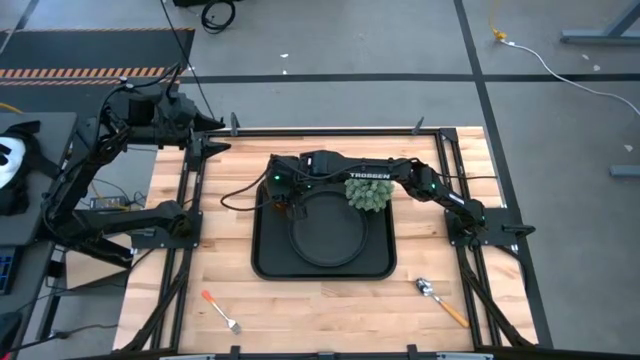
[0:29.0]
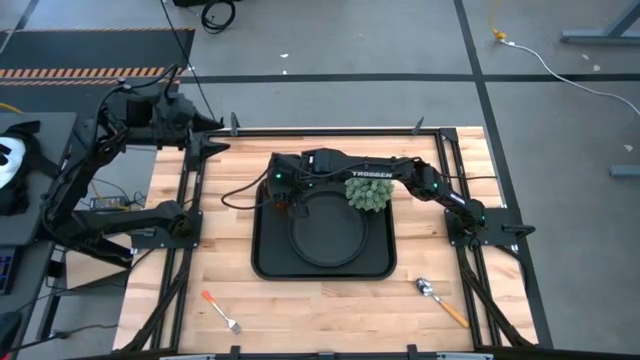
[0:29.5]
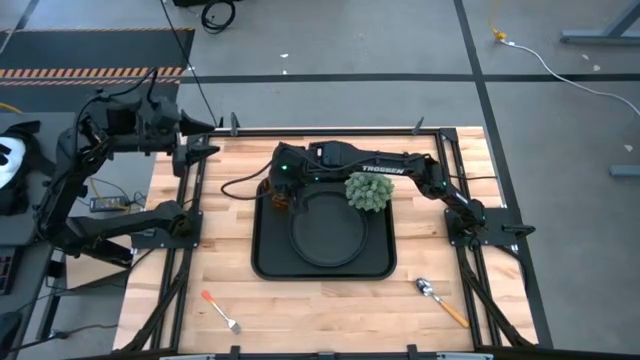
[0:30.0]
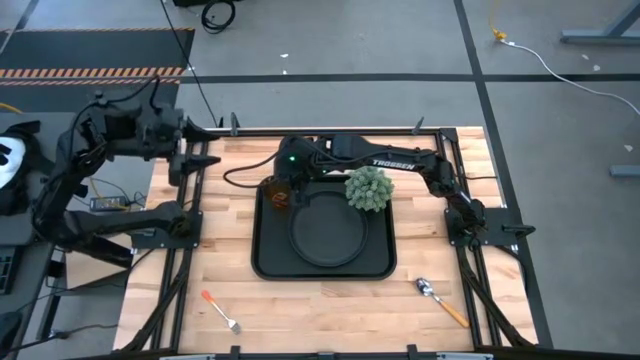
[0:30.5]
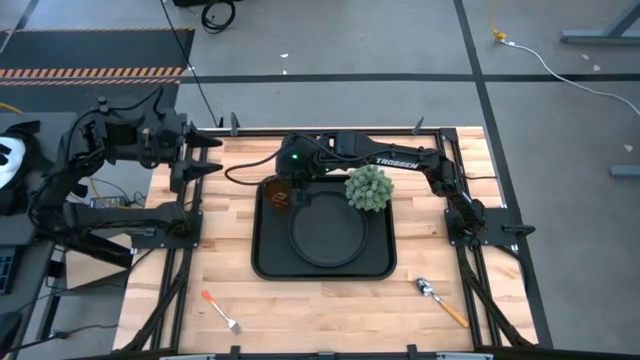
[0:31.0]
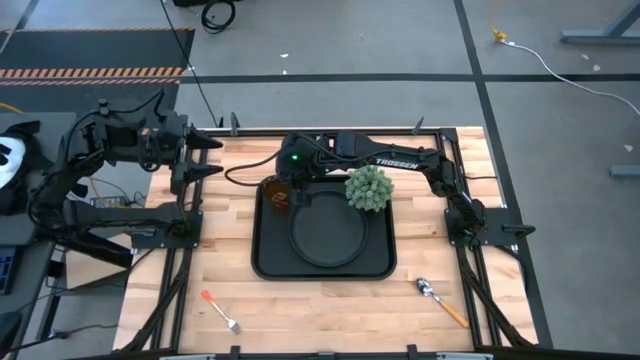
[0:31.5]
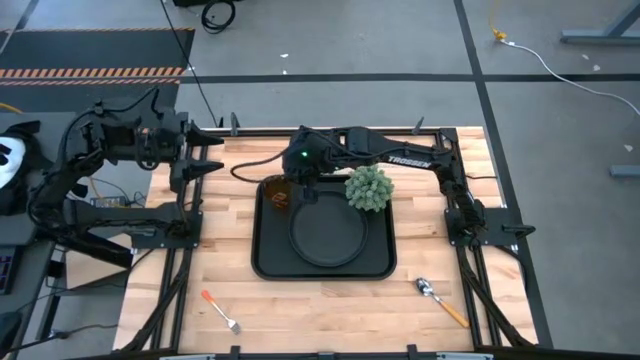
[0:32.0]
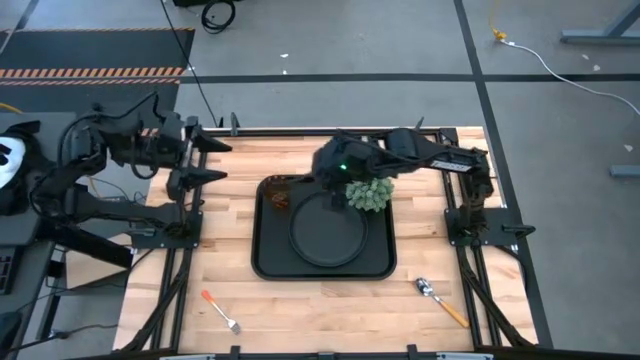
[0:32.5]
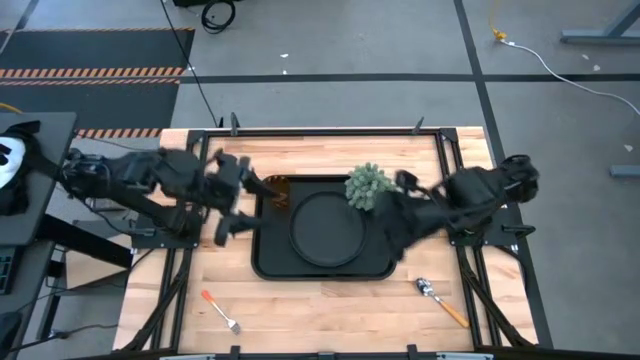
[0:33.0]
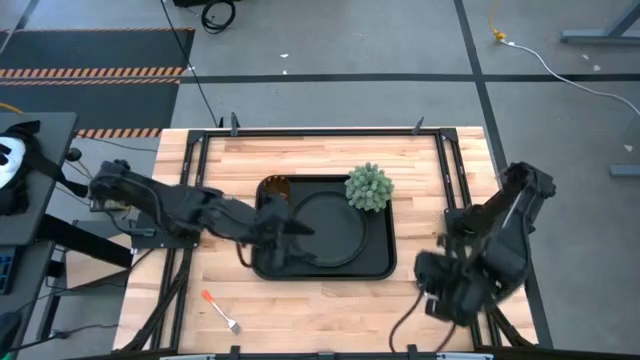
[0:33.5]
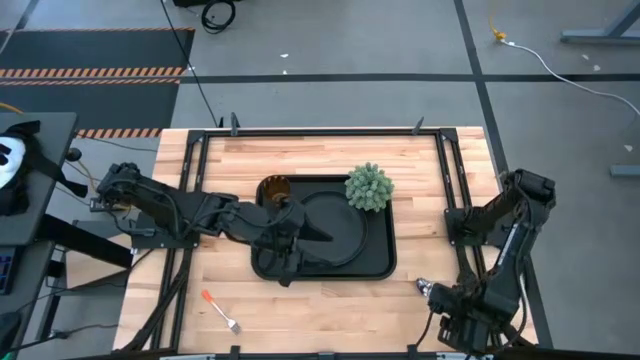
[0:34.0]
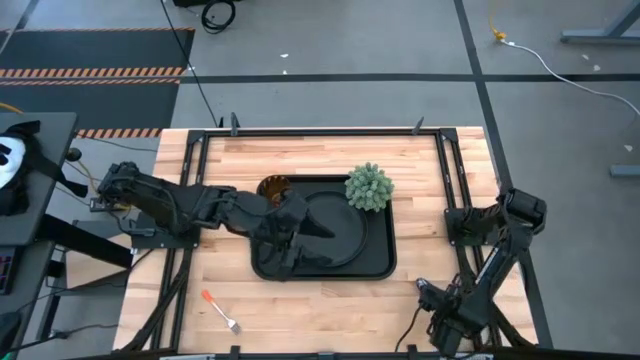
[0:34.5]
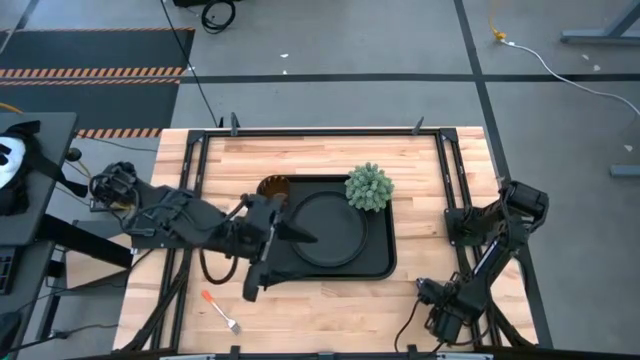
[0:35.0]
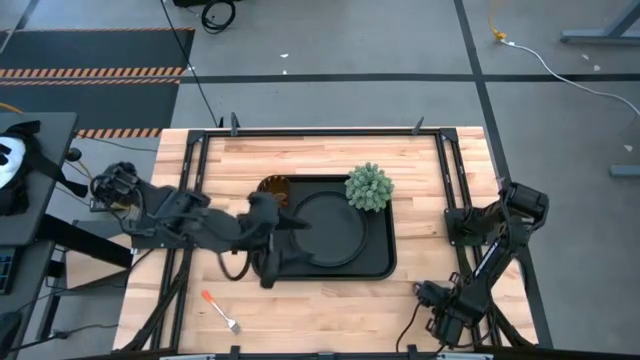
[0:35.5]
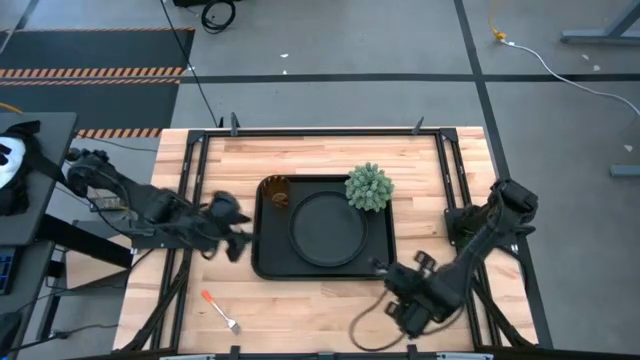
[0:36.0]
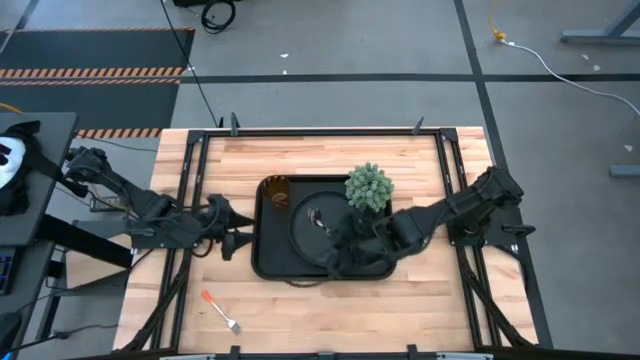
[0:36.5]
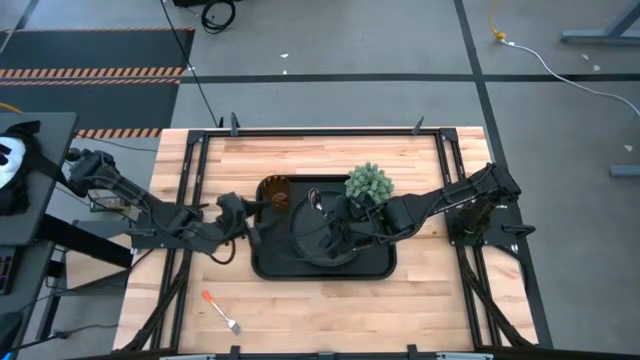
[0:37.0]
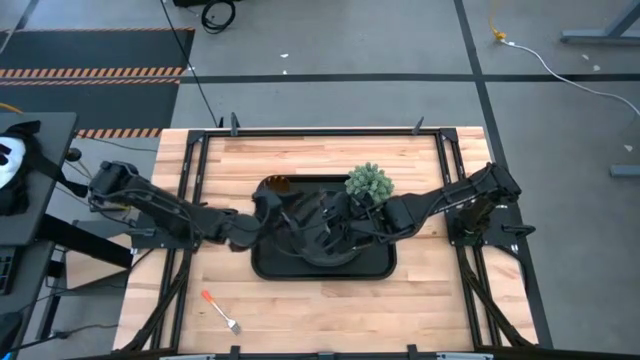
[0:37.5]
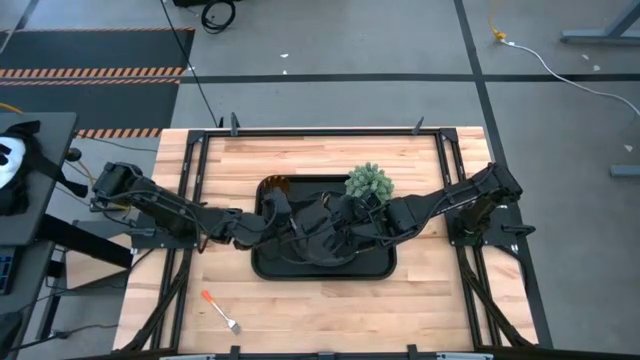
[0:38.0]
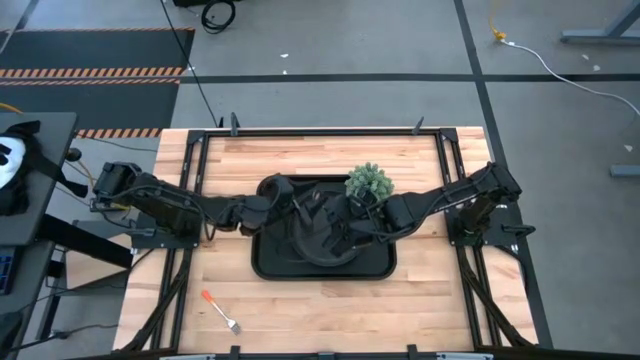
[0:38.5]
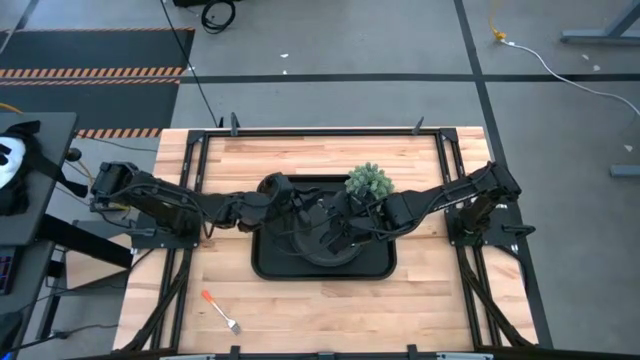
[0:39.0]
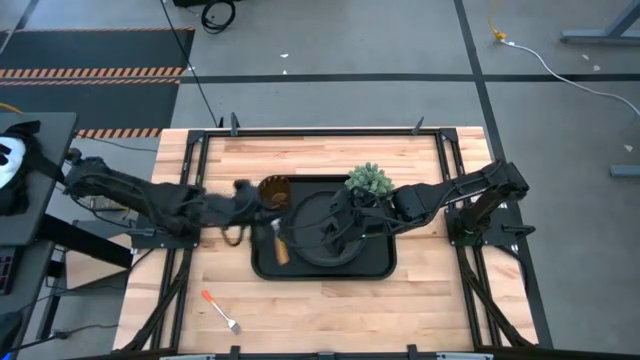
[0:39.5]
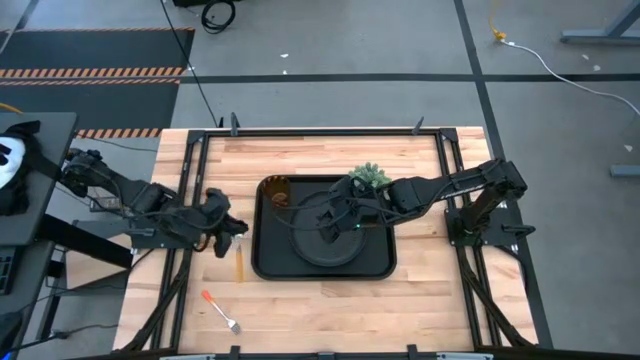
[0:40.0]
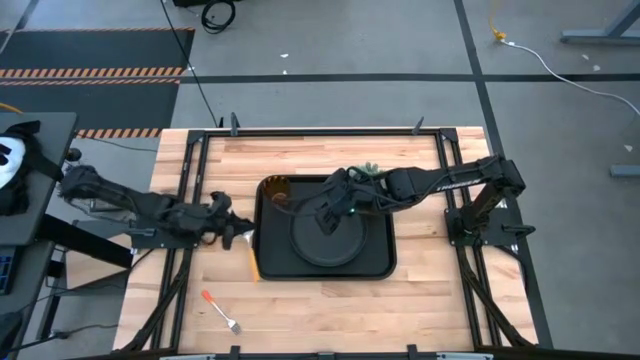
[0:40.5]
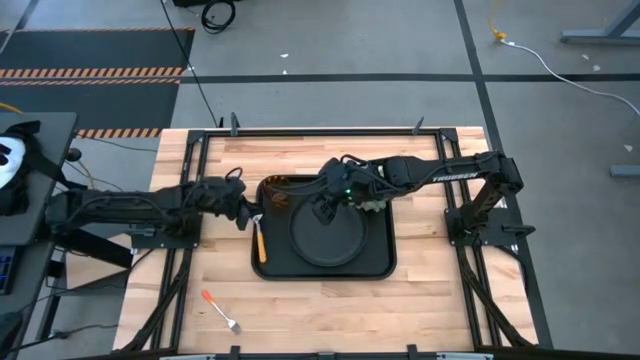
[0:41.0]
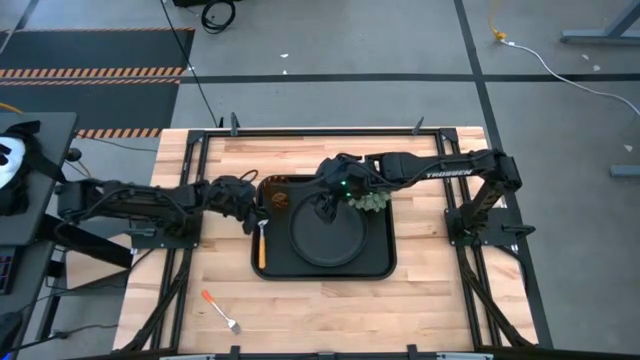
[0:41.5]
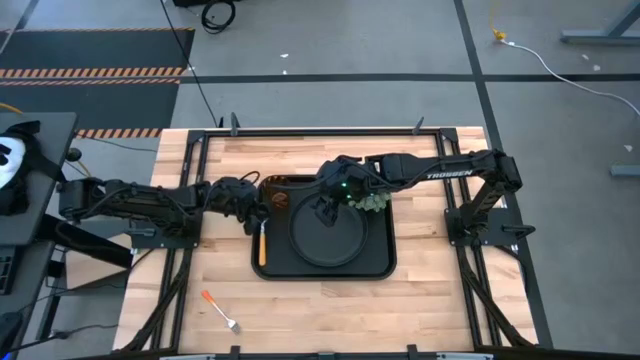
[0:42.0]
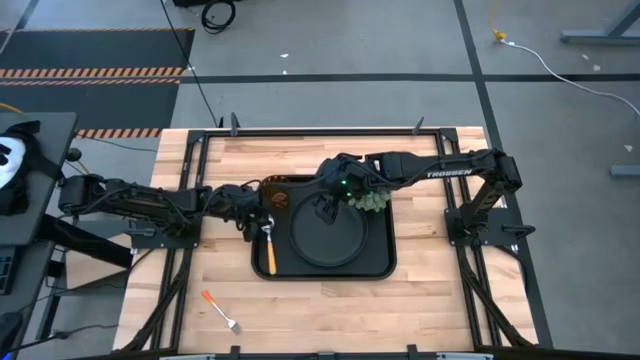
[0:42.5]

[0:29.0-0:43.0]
Task: Pick and place plate/cup/fork/spoon on tray
Put the orange spoon on the black serving tray to the left of the black plate

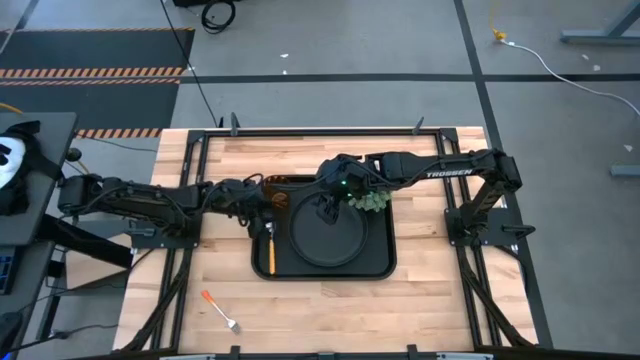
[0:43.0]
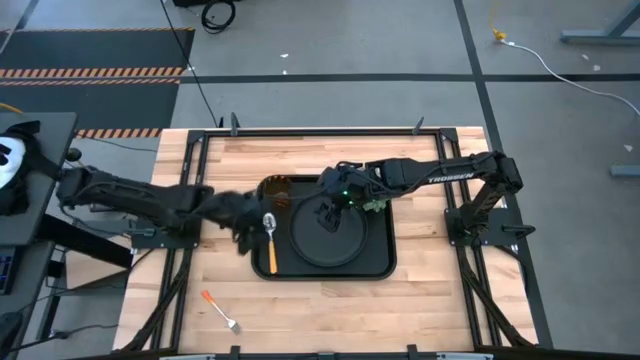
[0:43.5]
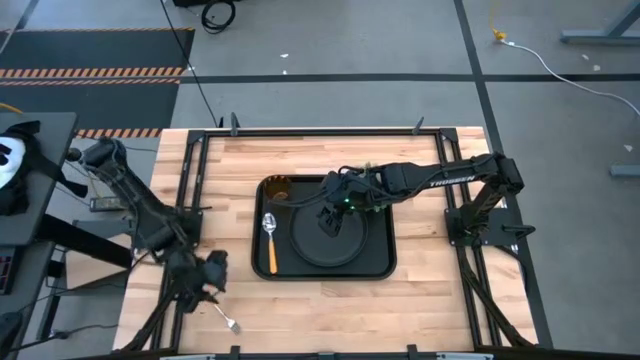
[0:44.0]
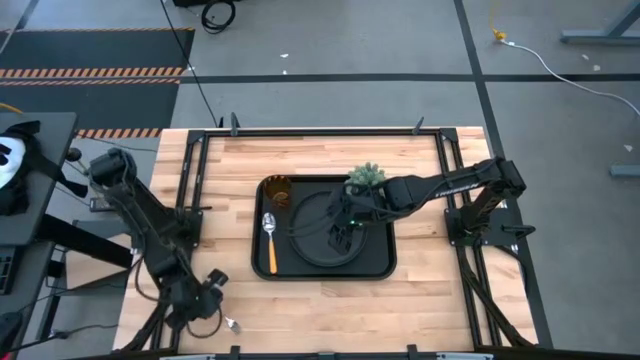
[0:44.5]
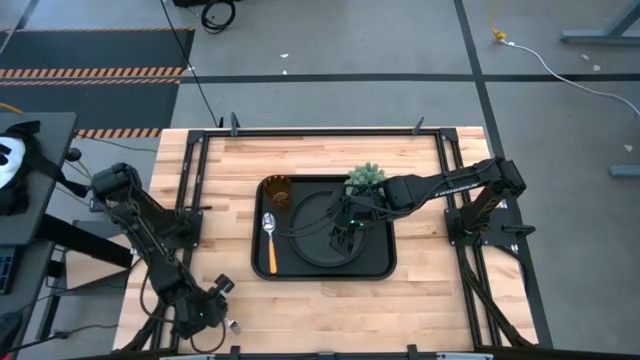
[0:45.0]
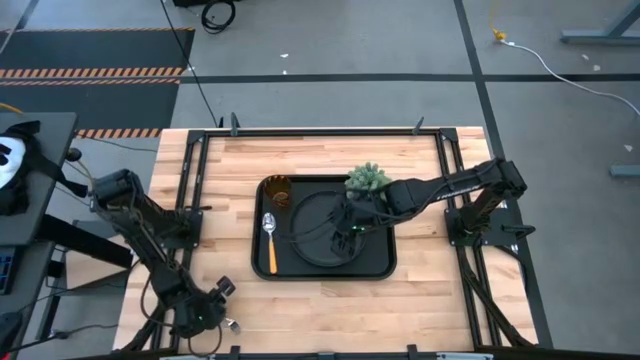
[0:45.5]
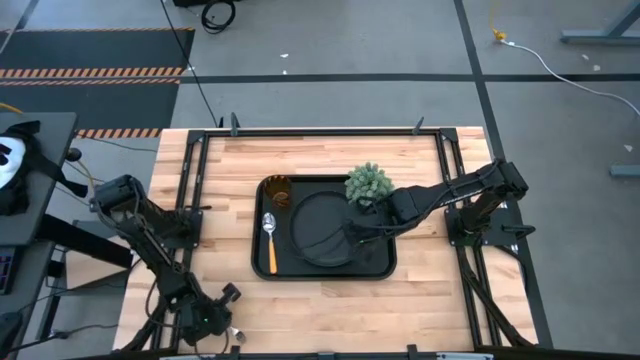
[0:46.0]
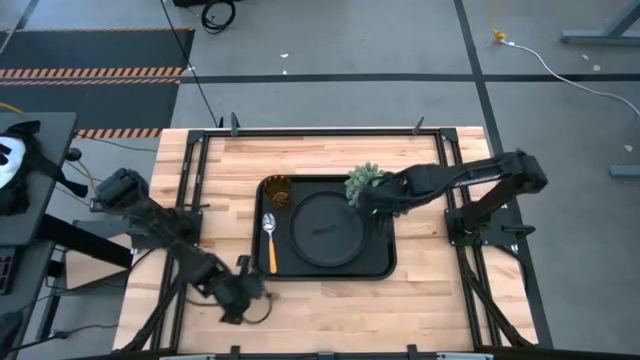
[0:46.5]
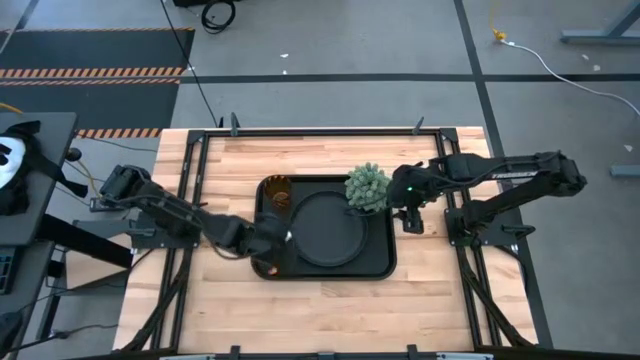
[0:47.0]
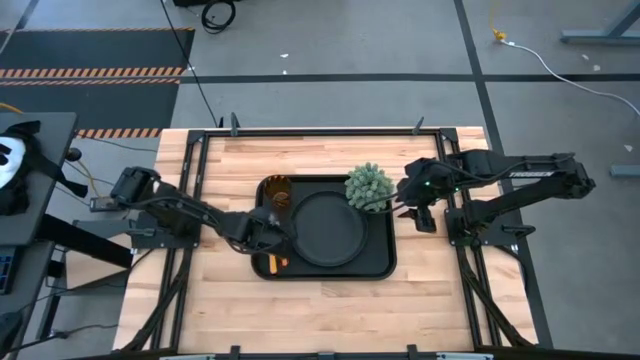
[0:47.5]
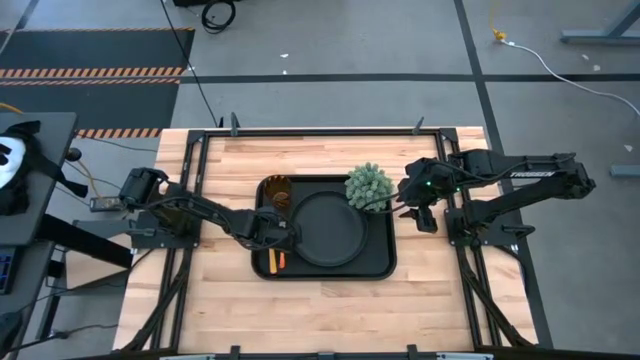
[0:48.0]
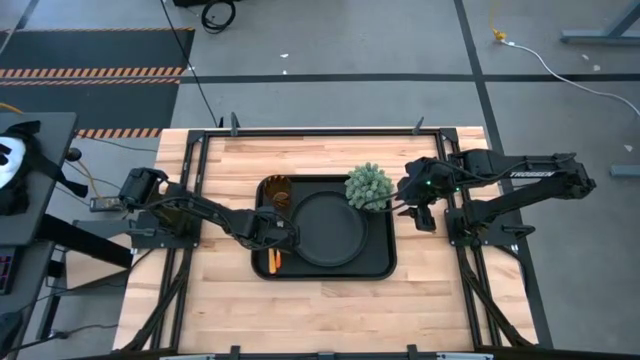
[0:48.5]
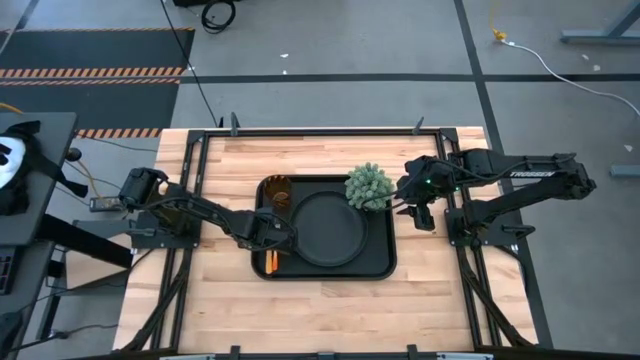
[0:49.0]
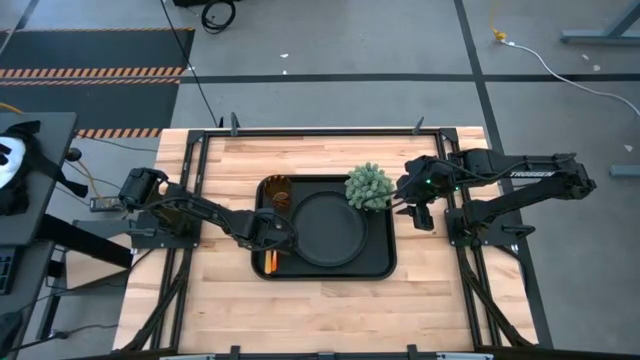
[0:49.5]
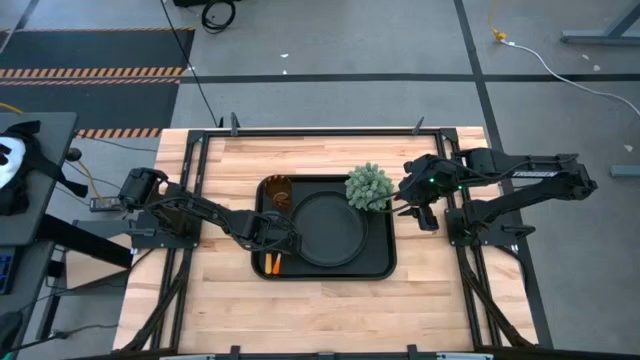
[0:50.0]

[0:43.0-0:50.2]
Put the orange fork on the black serving tray to the right of the orange spoon
